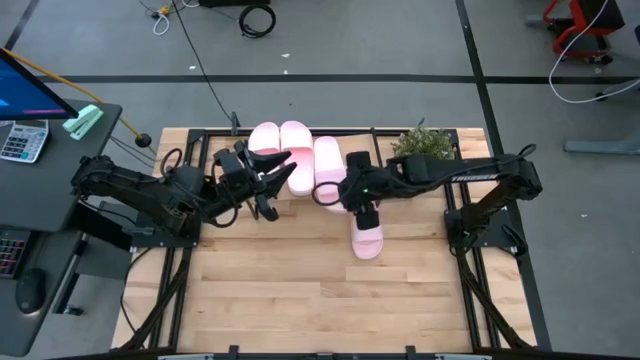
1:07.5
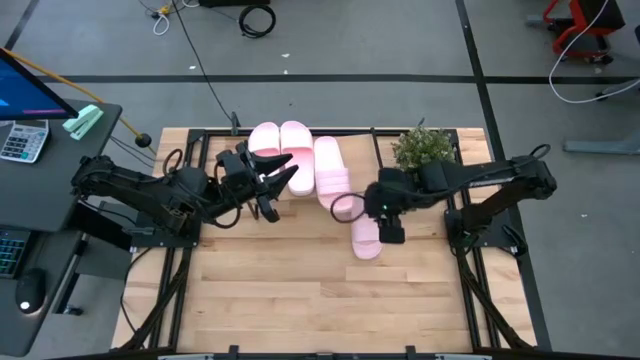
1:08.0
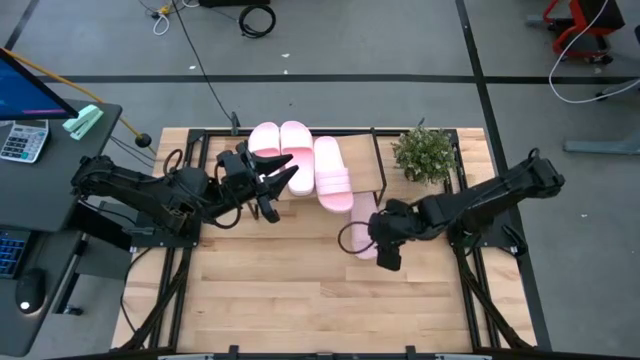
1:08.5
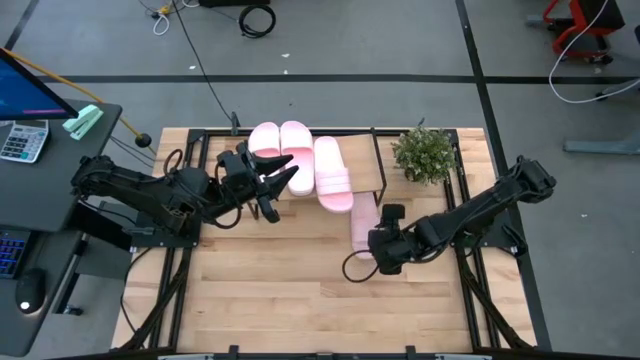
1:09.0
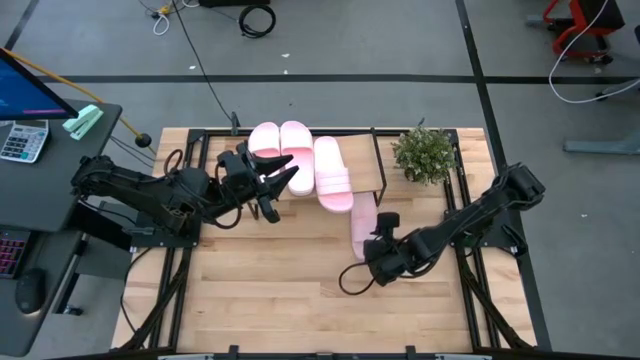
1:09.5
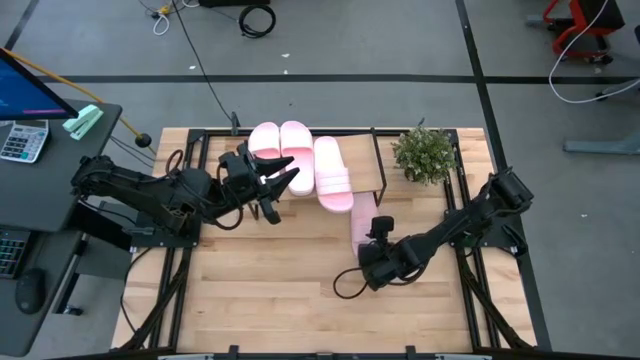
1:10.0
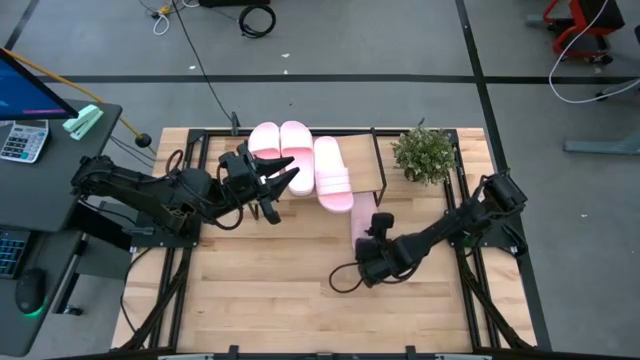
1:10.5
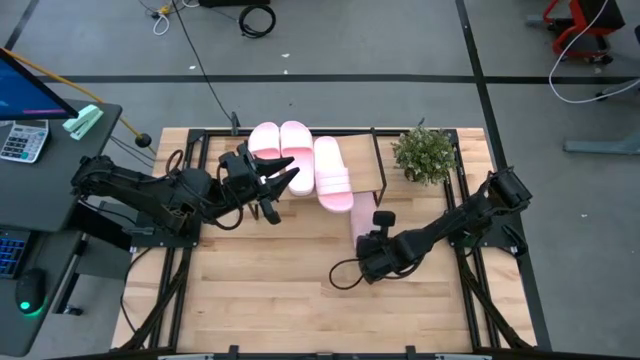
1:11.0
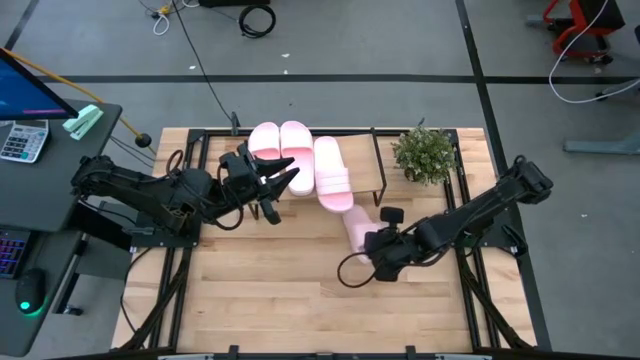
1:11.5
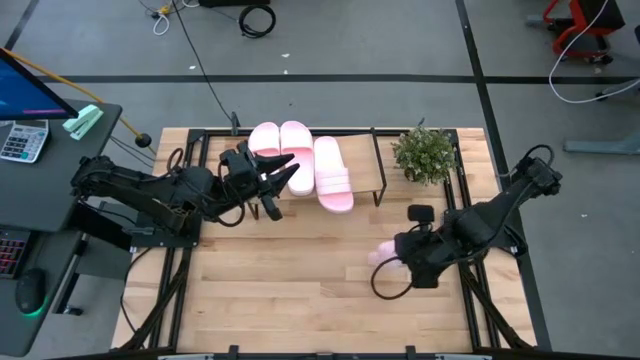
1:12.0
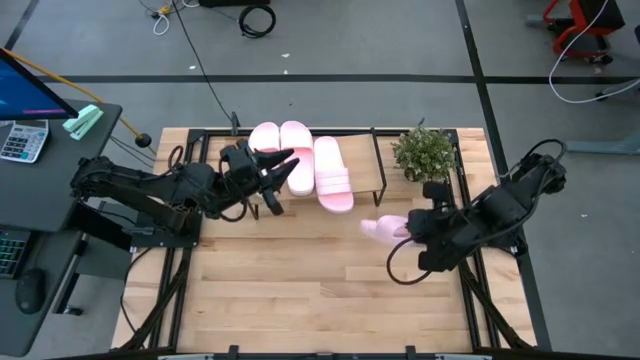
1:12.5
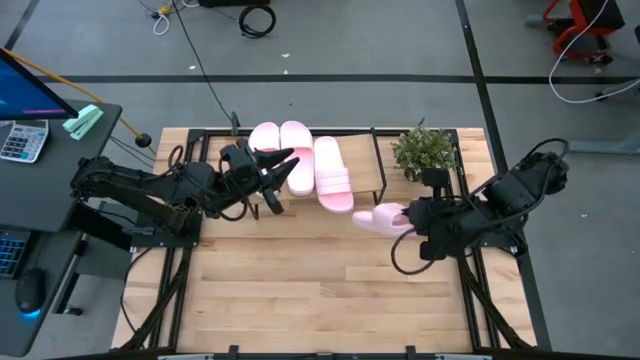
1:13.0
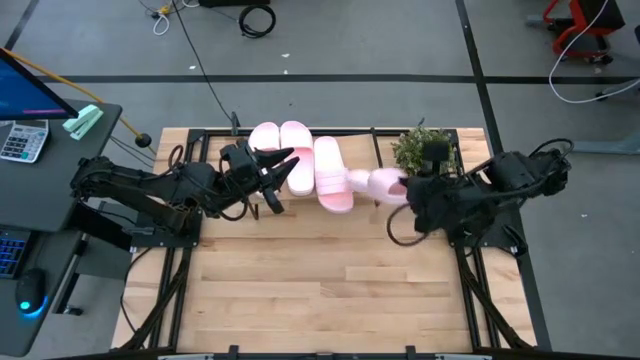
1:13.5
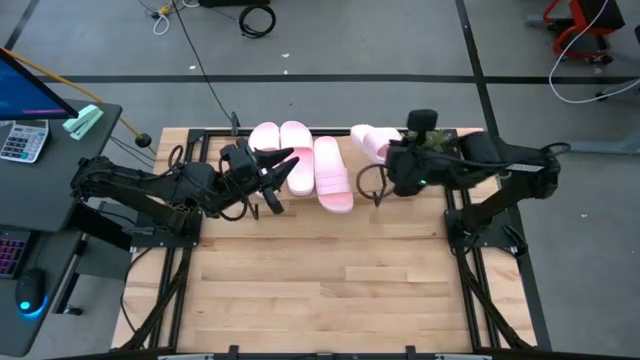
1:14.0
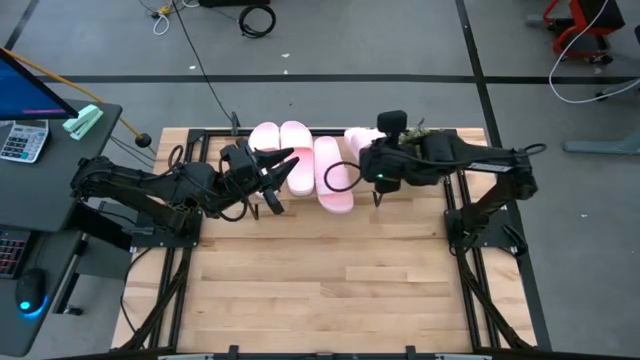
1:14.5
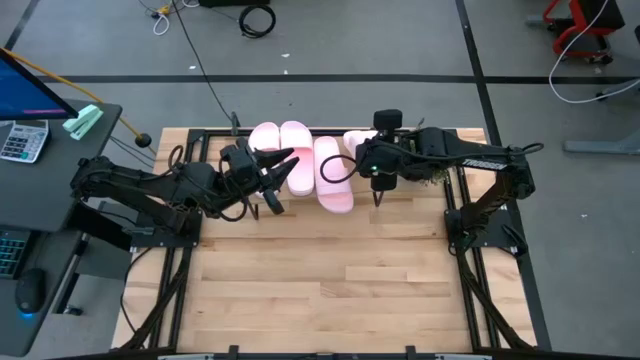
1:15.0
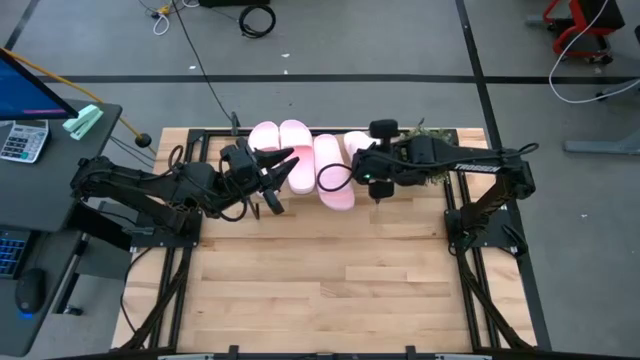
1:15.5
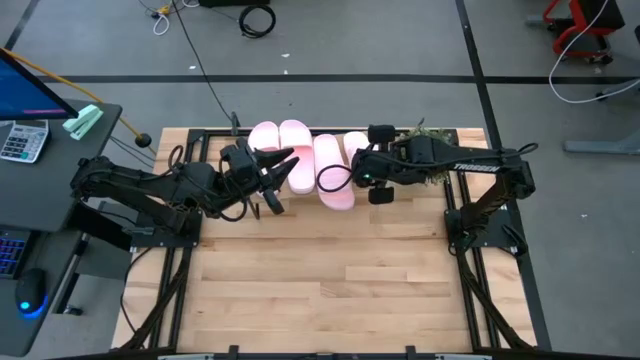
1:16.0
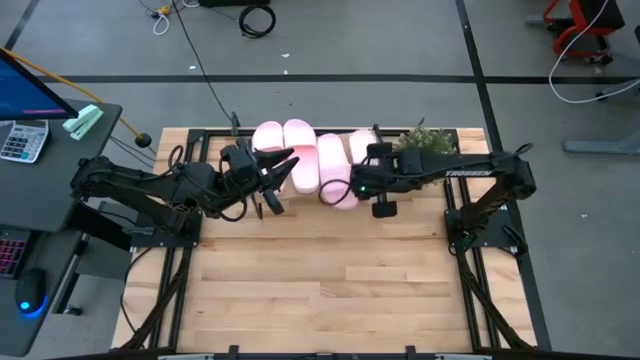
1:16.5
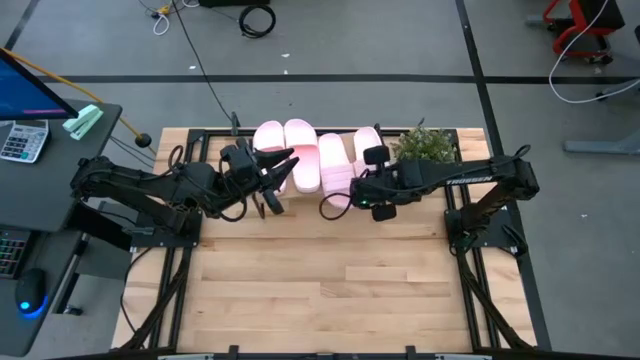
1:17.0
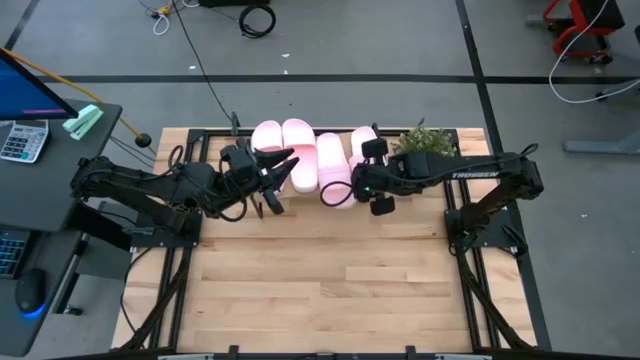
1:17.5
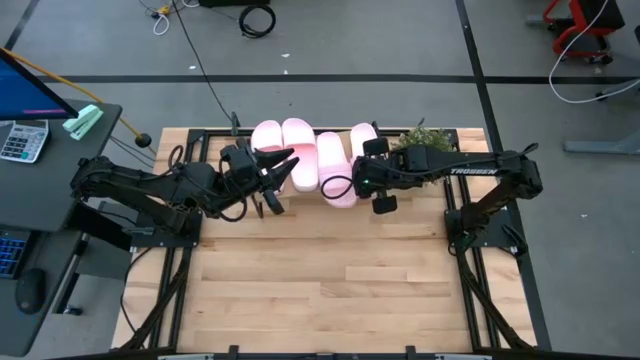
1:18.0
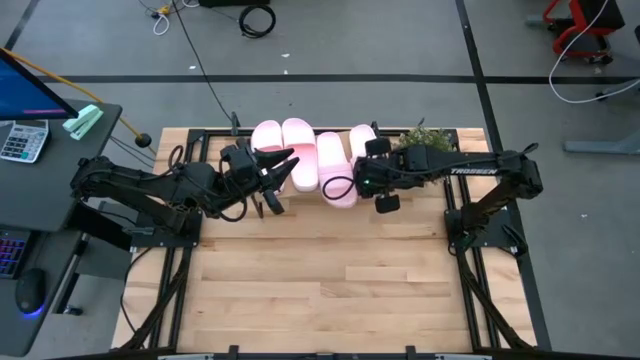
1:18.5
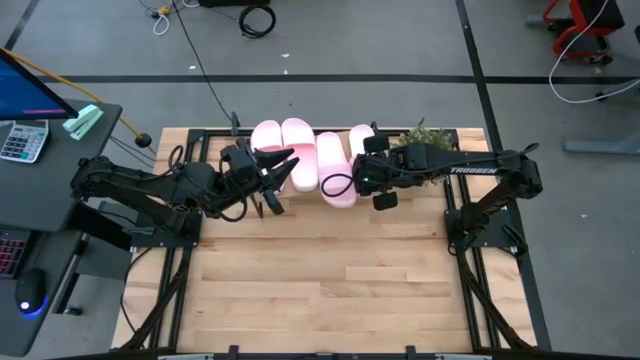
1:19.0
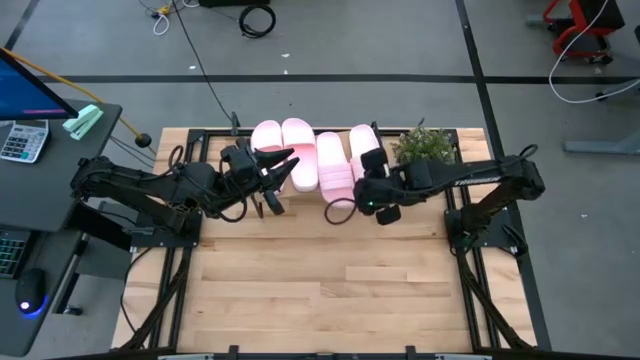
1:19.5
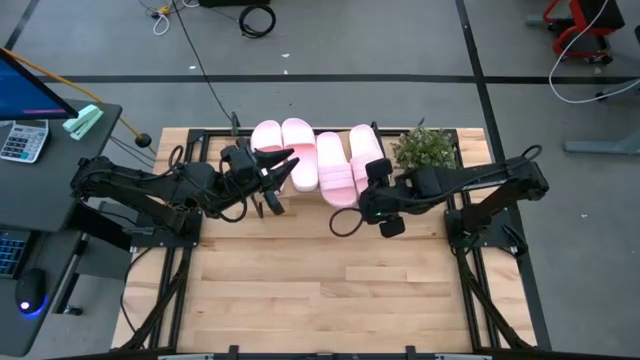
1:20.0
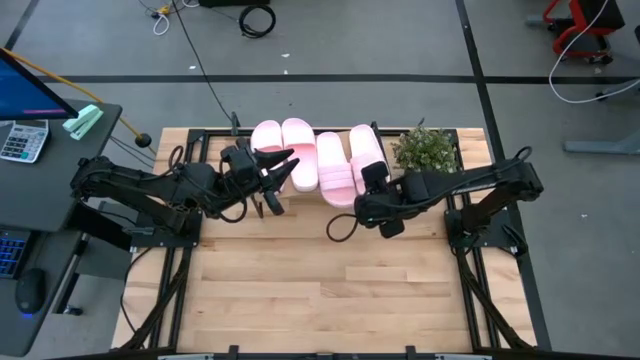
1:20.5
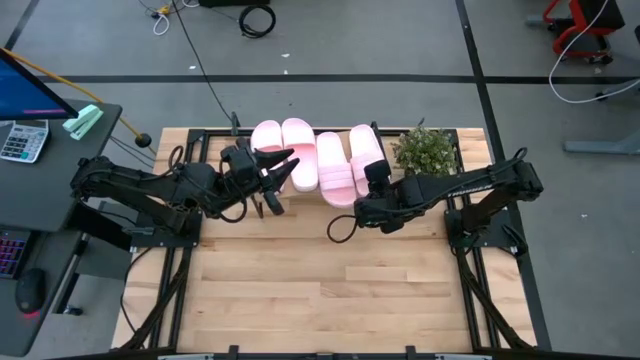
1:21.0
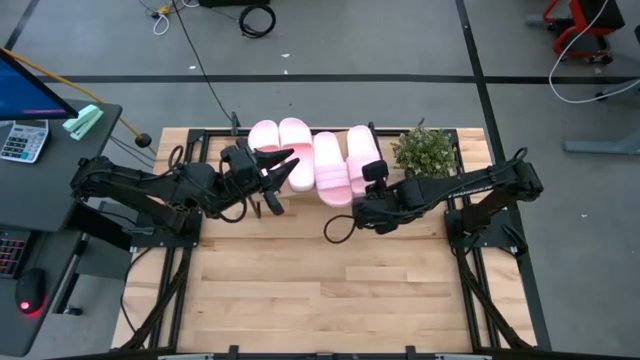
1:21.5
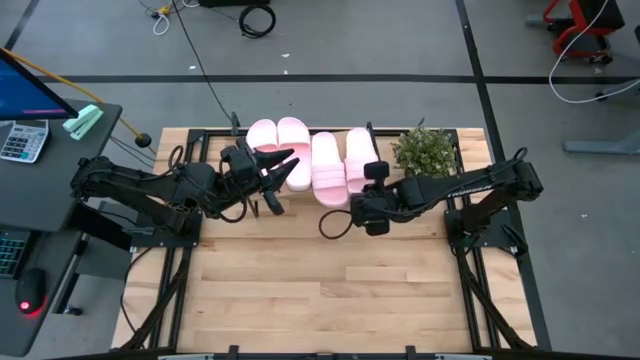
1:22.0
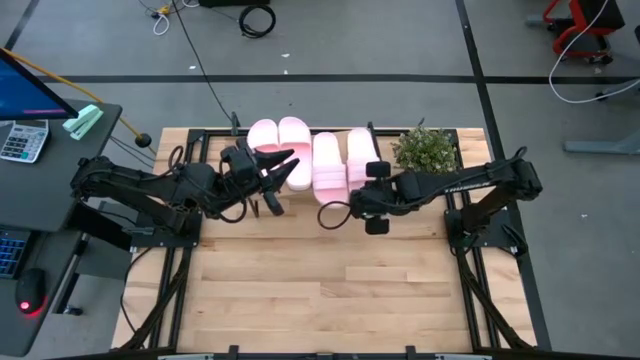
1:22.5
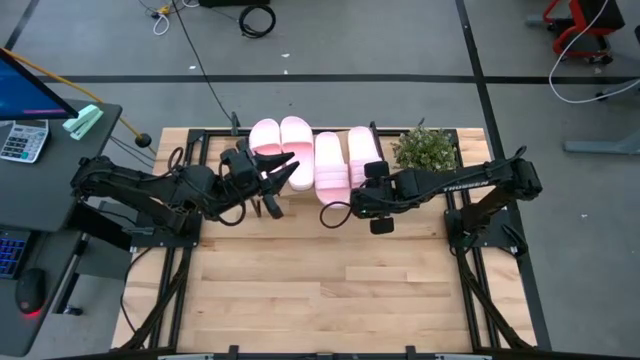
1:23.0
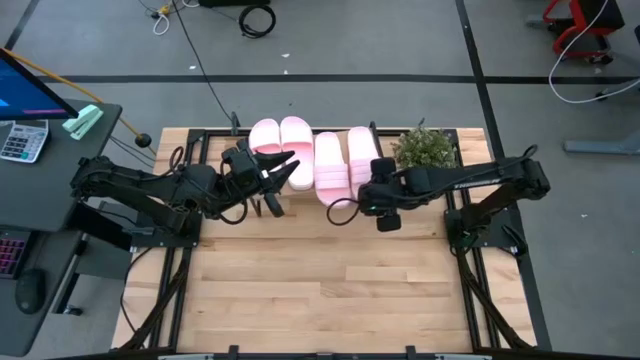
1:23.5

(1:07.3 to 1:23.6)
Task: Pick and place slides into the shelf
Put the pink slipper on the shelf

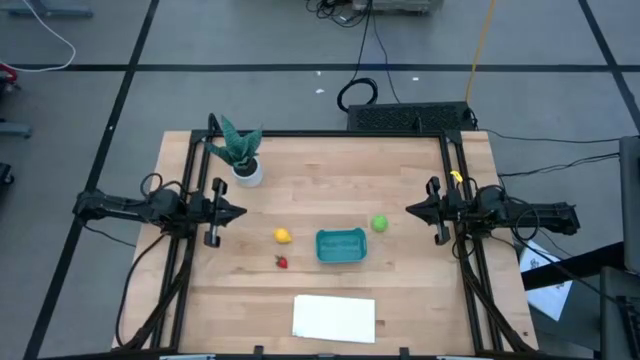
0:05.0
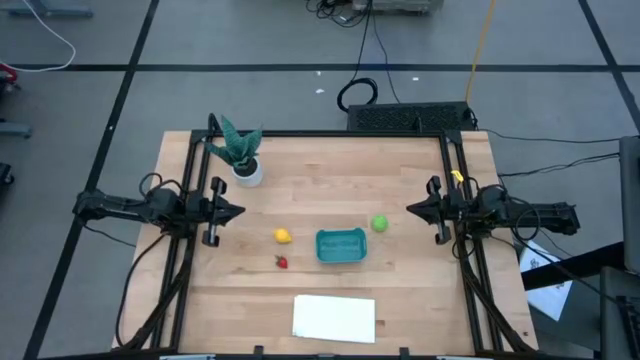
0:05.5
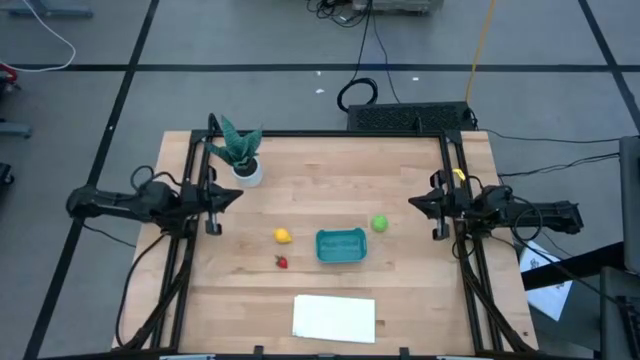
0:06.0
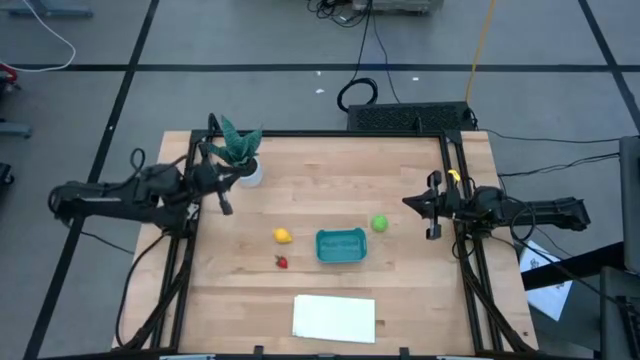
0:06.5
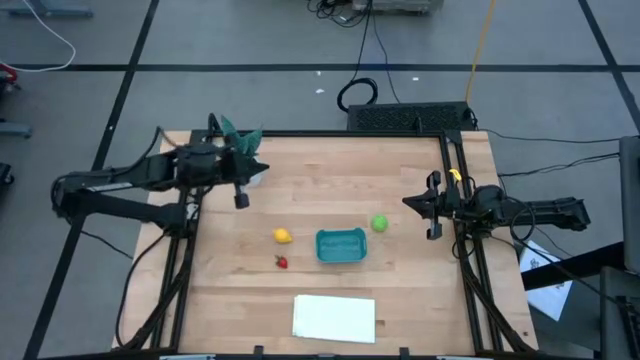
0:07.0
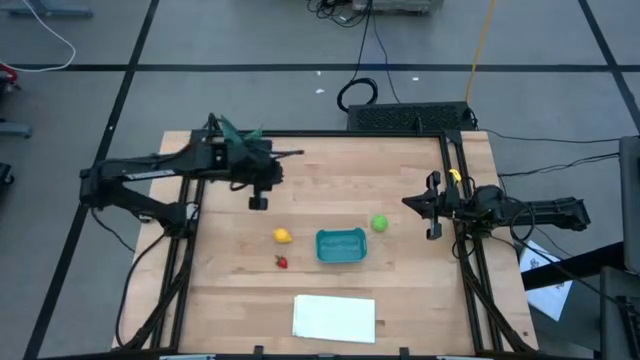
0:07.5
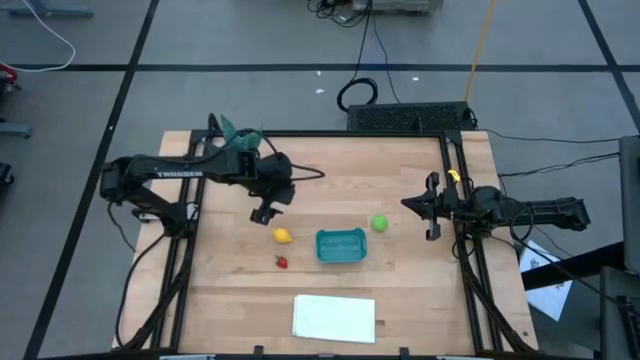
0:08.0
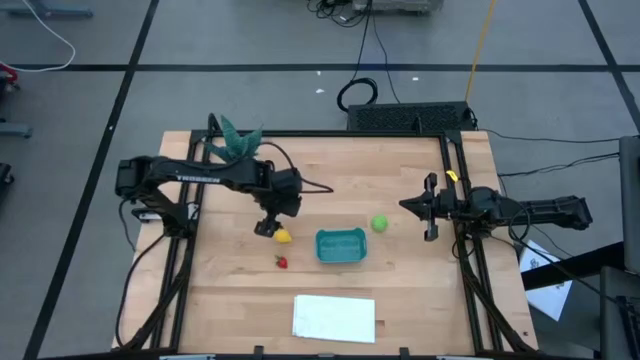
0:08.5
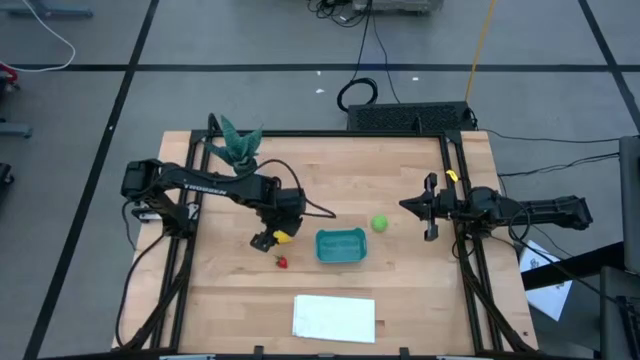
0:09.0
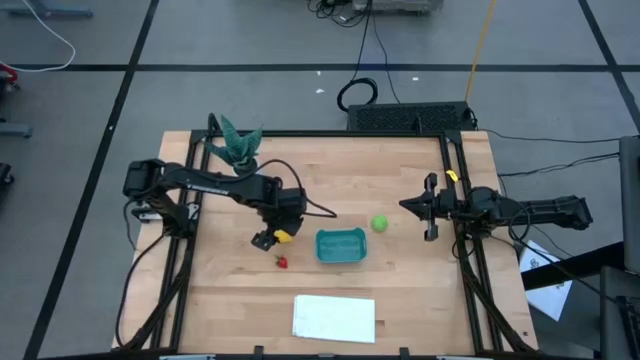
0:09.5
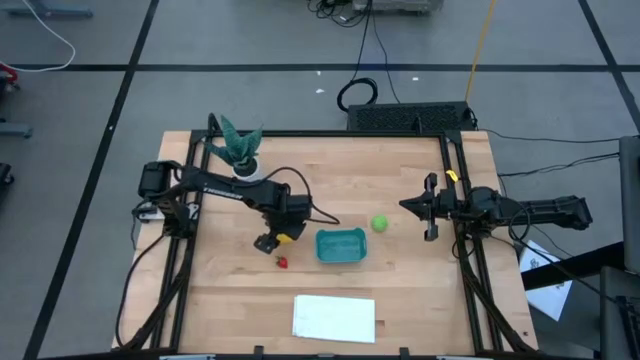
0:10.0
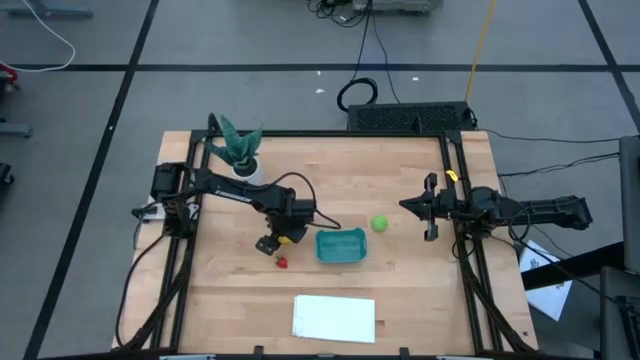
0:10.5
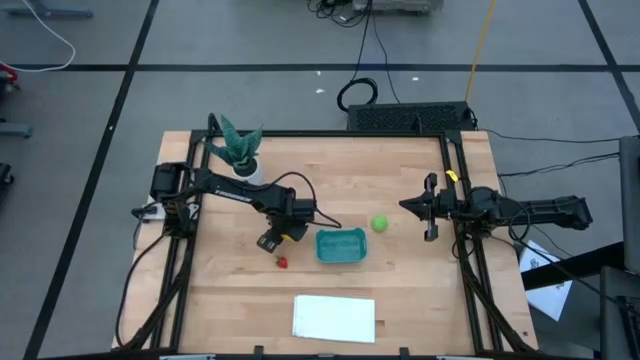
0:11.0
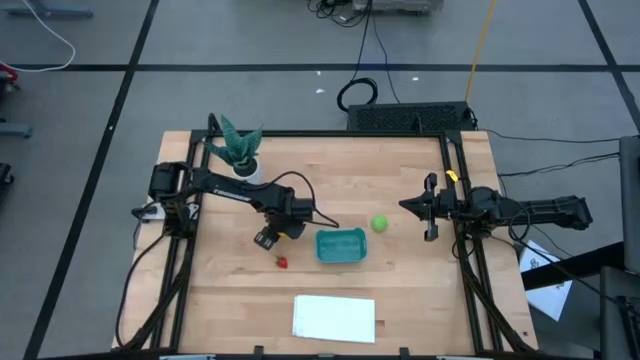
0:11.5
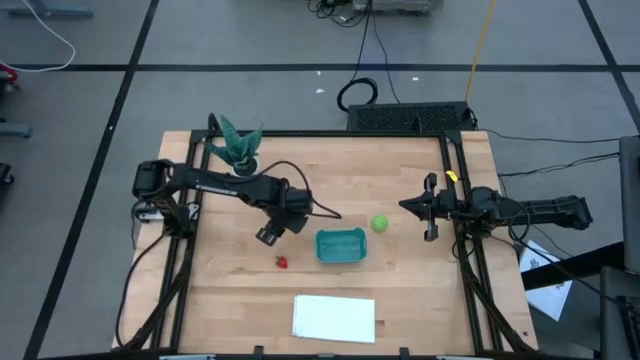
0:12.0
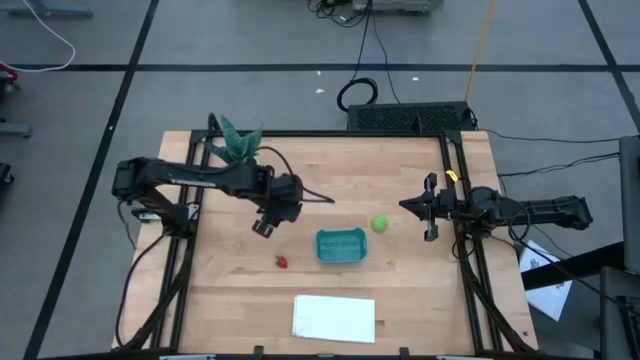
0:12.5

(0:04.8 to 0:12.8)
Task: Pick and placing Produce into tupperware
Put the yellow lemon into the blue bin
